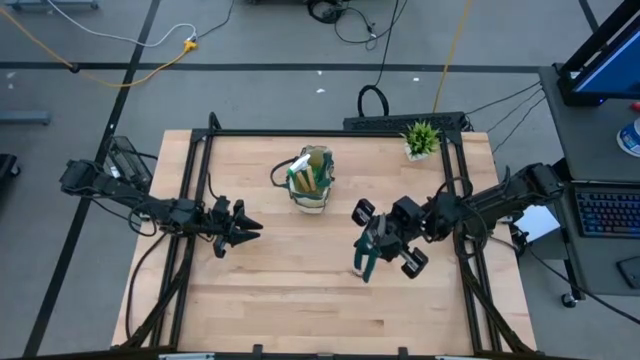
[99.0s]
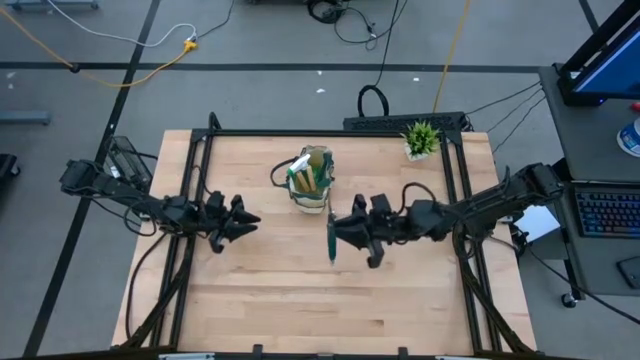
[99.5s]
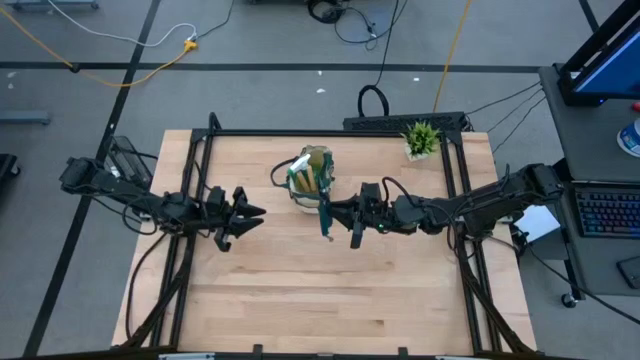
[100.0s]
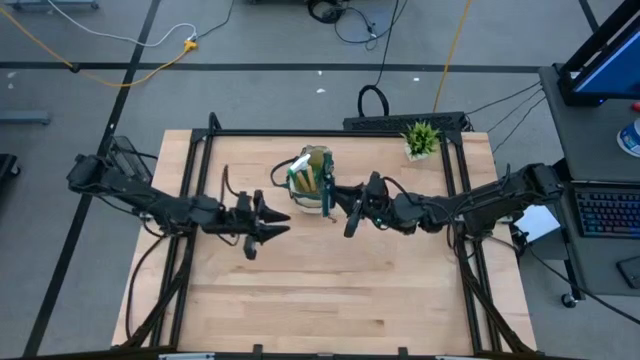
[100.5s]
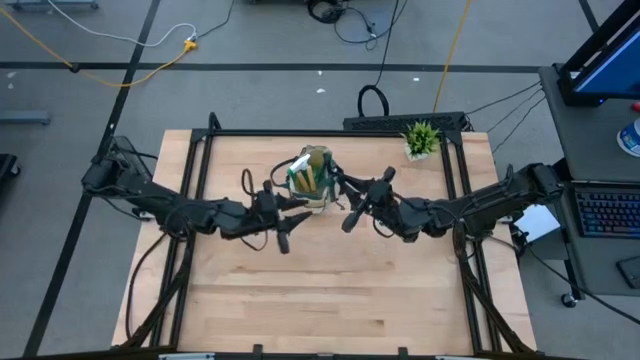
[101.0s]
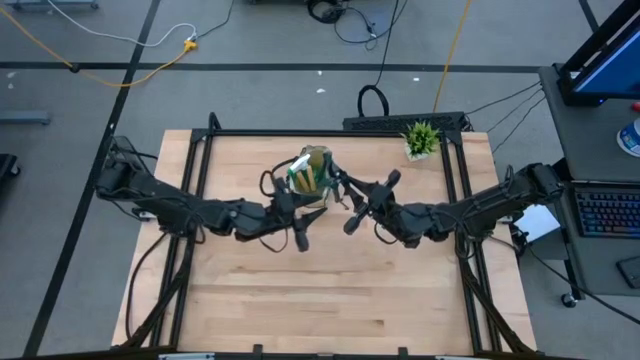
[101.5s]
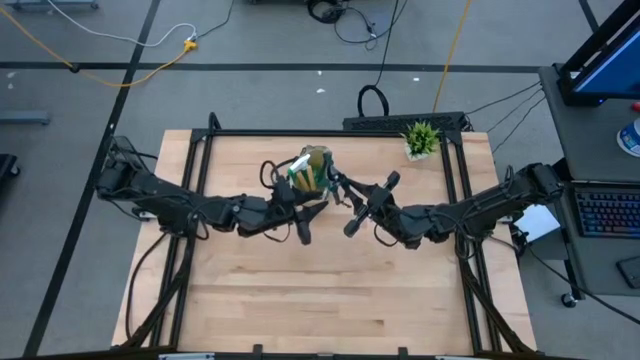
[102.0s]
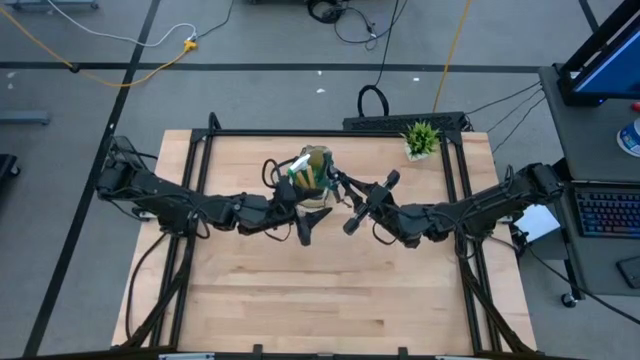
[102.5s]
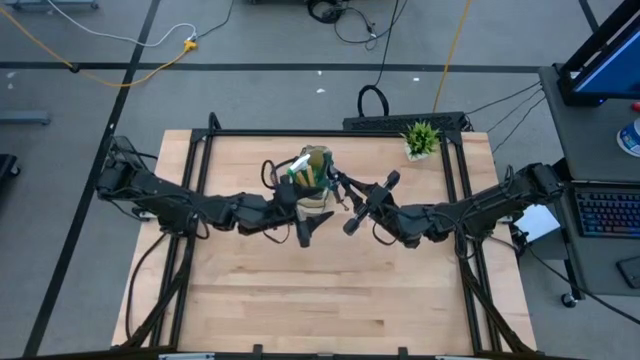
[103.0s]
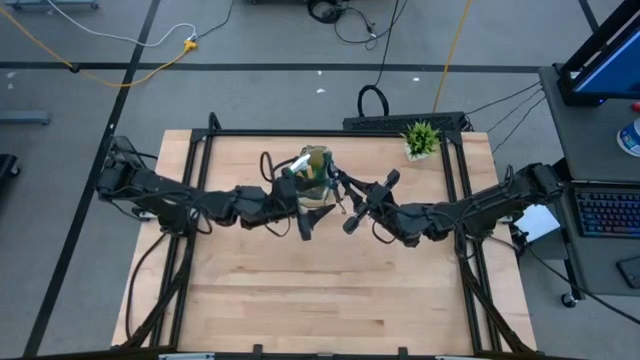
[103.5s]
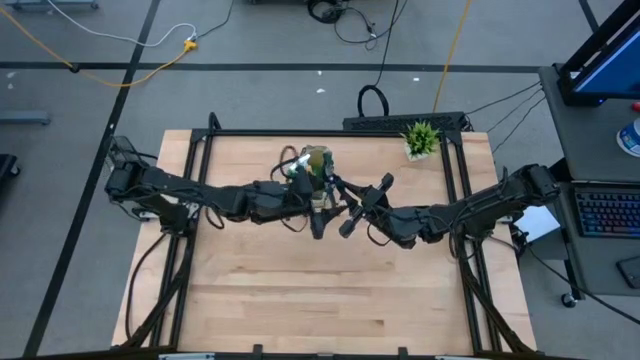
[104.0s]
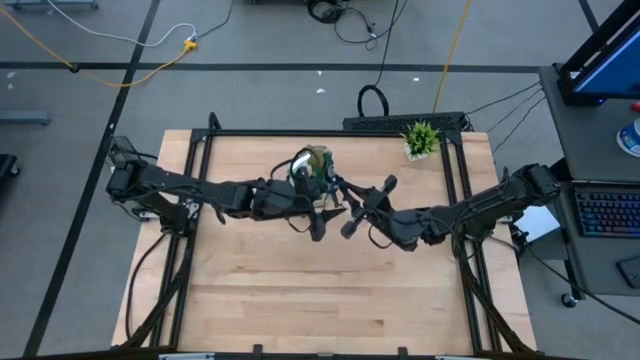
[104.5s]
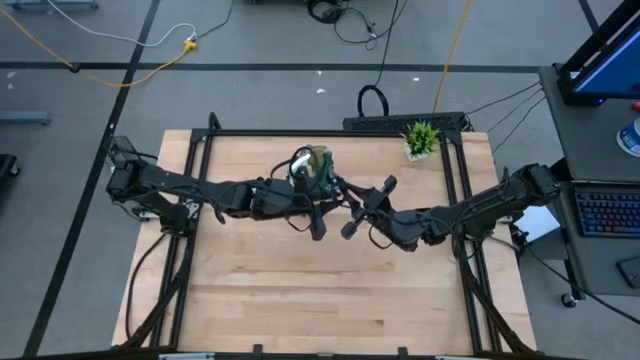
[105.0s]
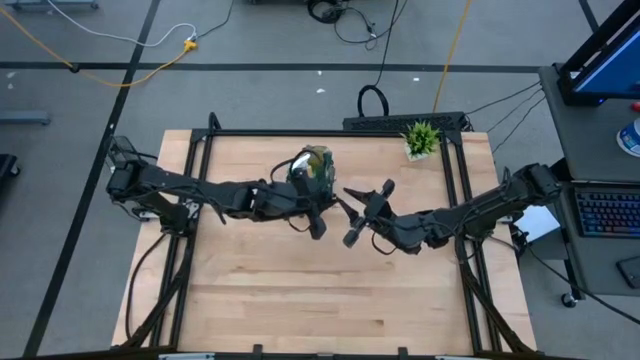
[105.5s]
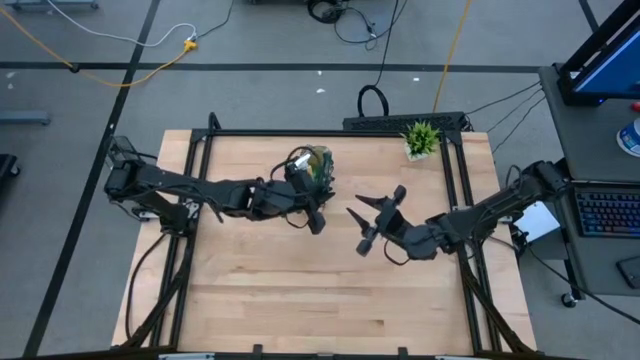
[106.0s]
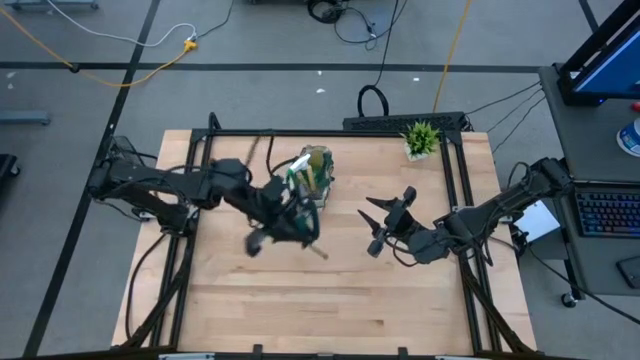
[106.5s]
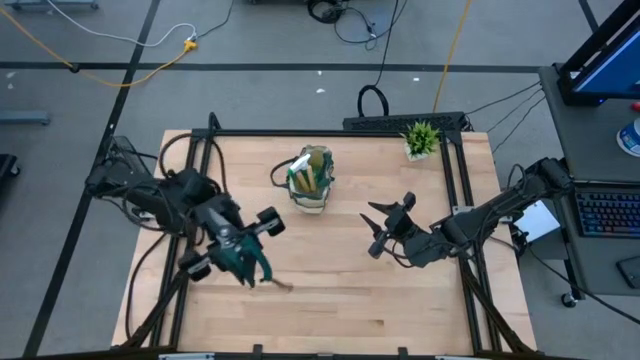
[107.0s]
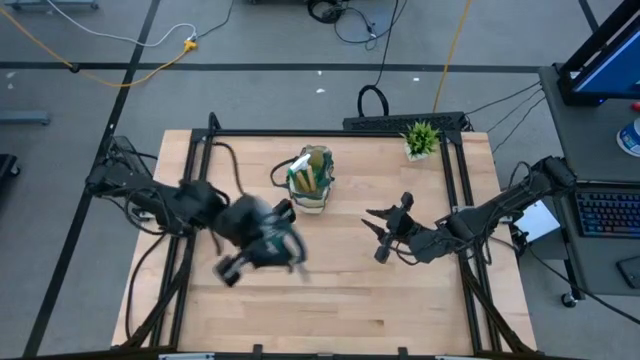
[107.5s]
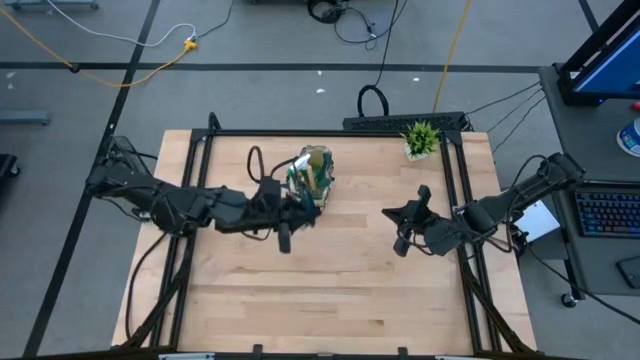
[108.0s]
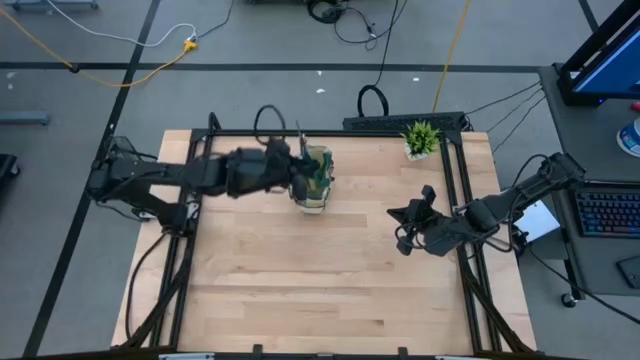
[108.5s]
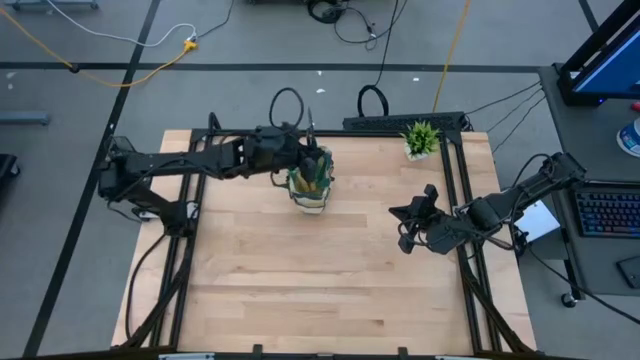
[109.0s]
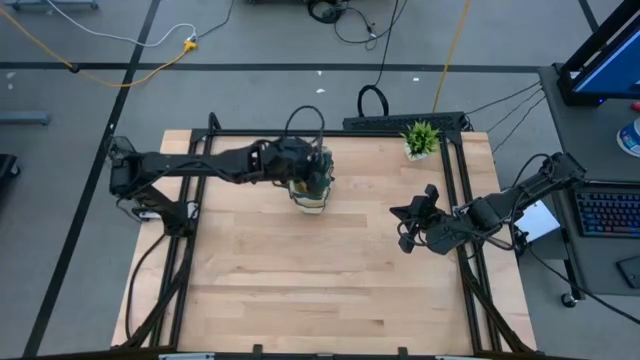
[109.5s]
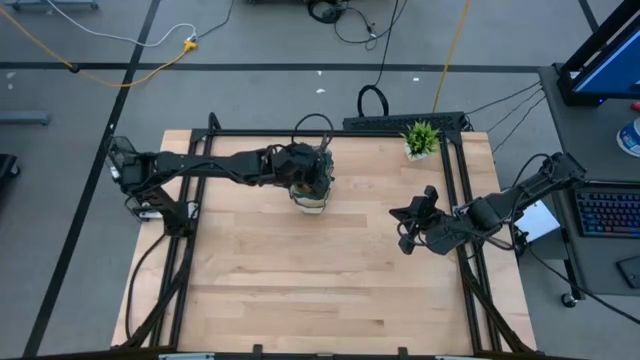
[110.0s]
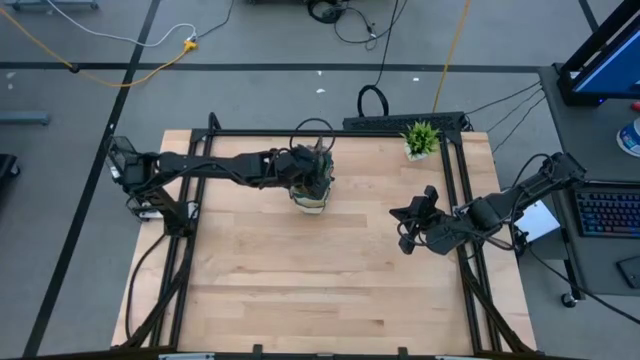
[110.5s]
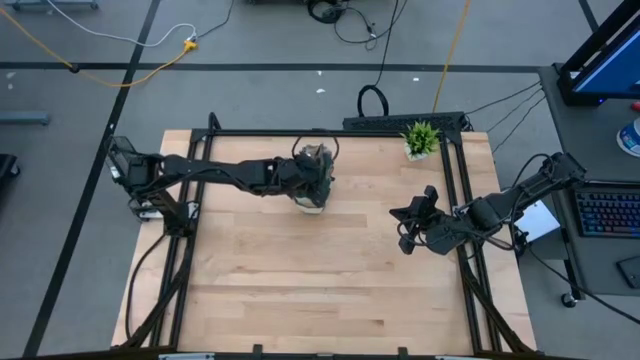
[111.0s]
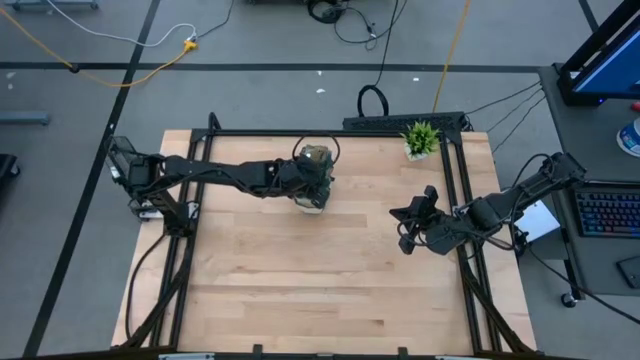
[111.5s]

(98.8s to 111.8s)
Task: Pick & Place Garden tools in Gardening bag
Put the green shear scissors into the top gardening bag

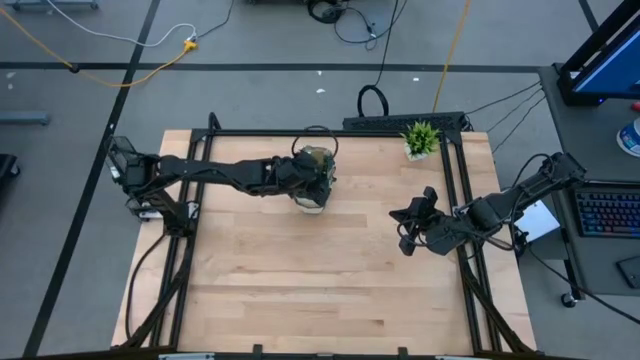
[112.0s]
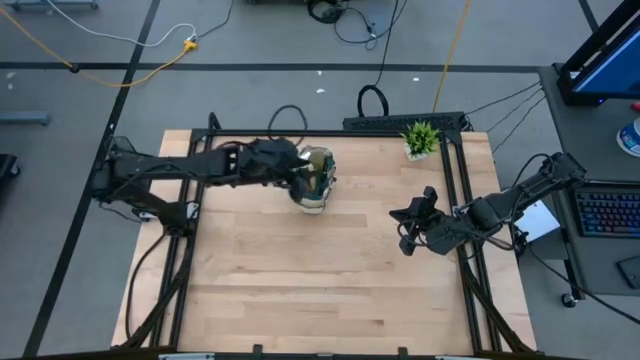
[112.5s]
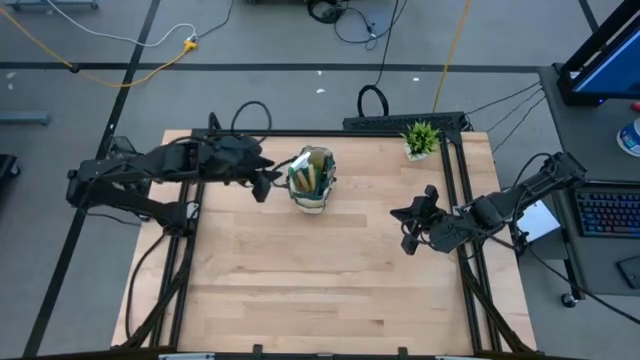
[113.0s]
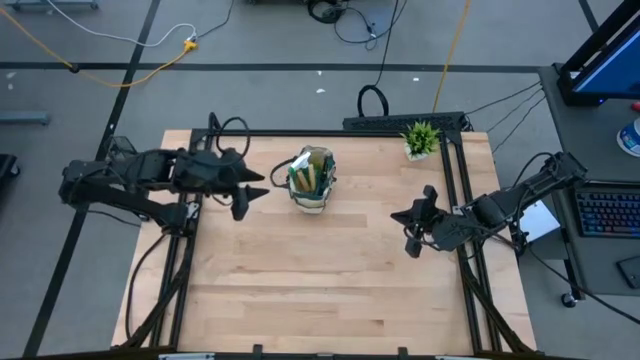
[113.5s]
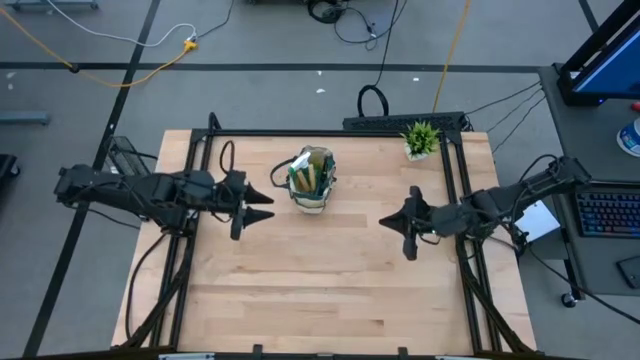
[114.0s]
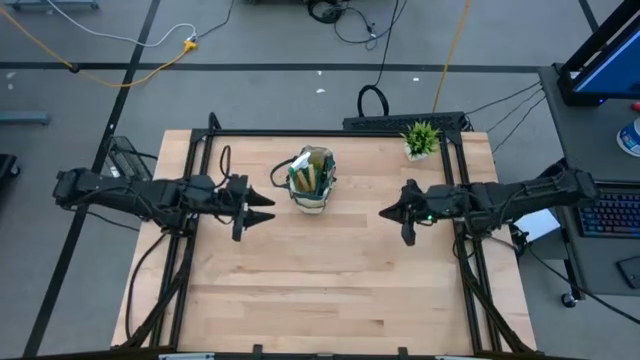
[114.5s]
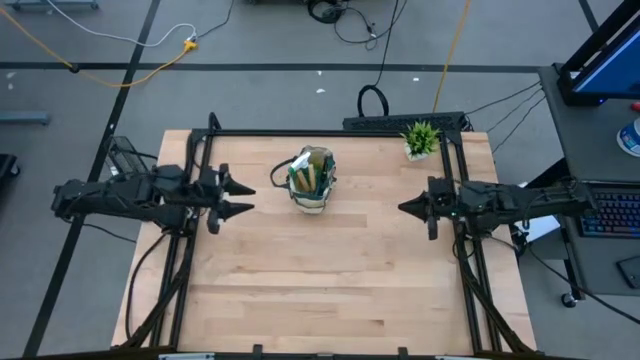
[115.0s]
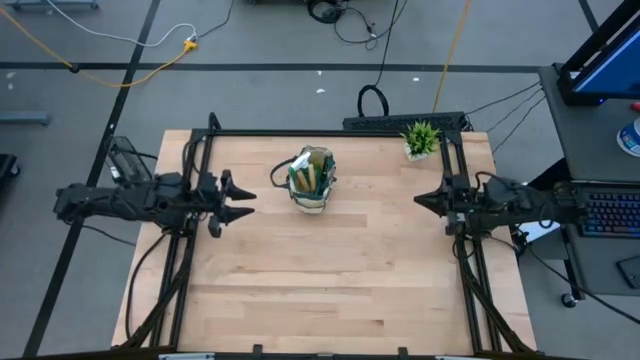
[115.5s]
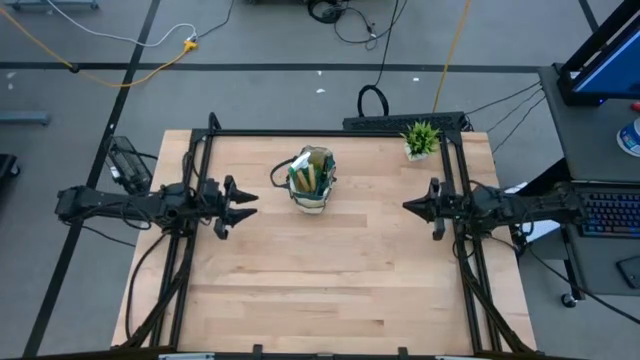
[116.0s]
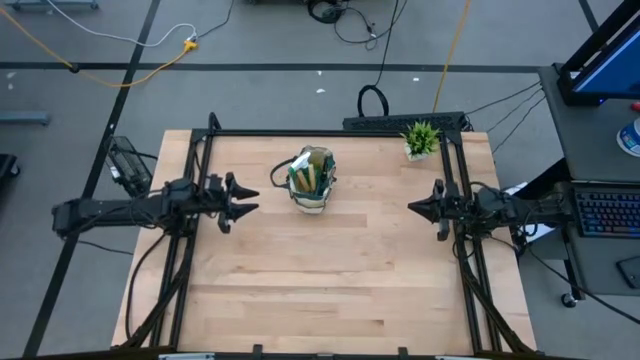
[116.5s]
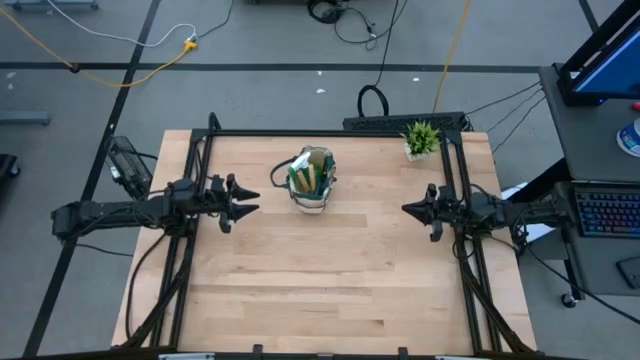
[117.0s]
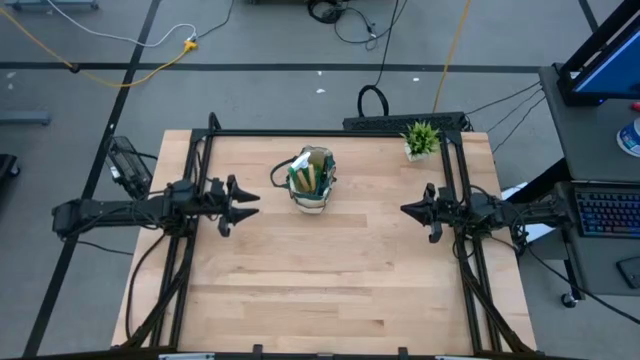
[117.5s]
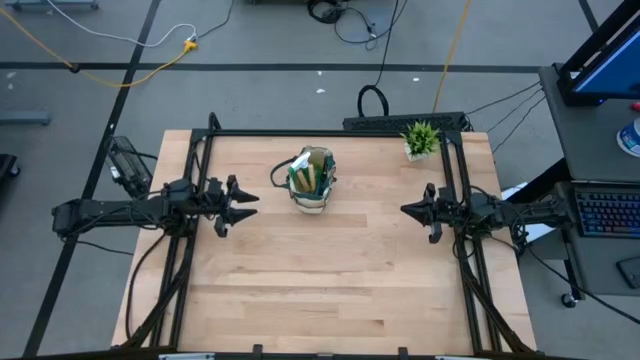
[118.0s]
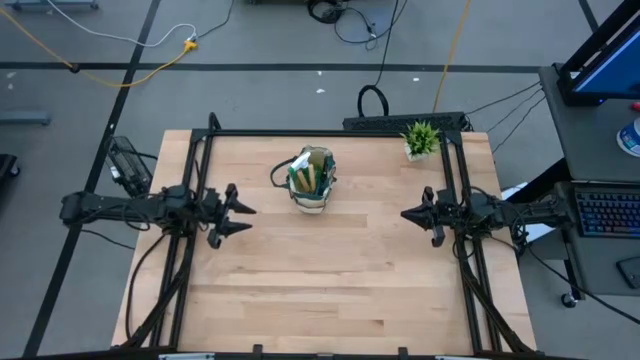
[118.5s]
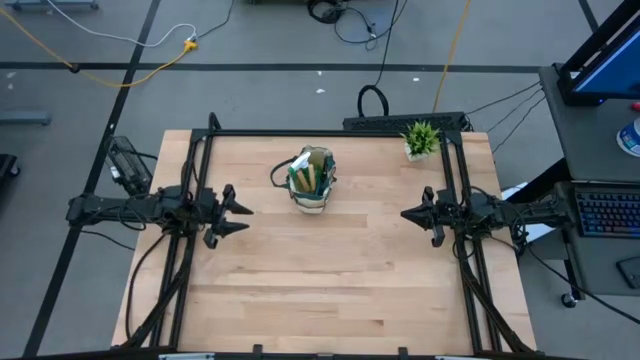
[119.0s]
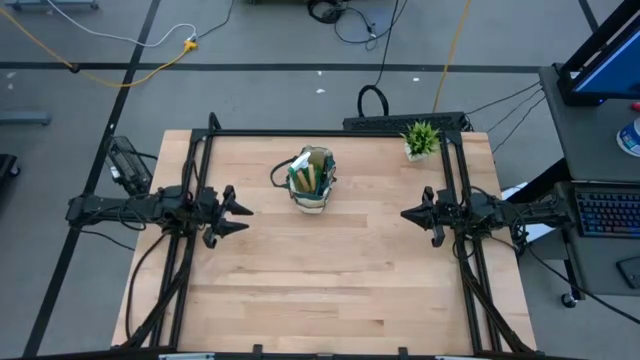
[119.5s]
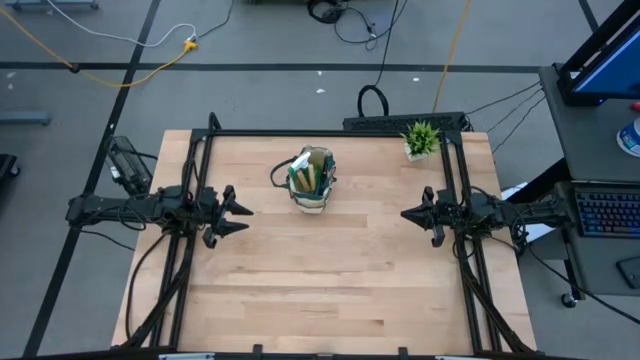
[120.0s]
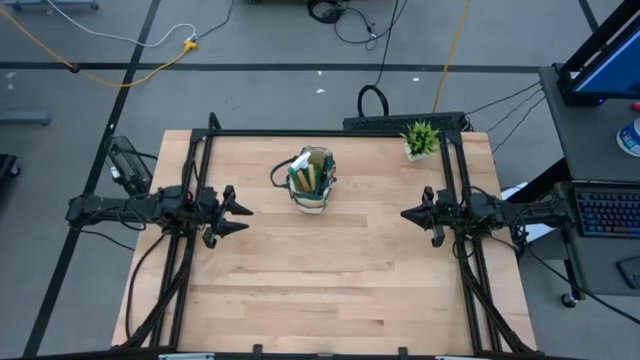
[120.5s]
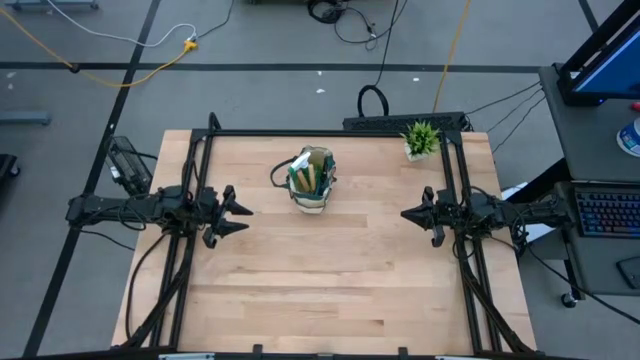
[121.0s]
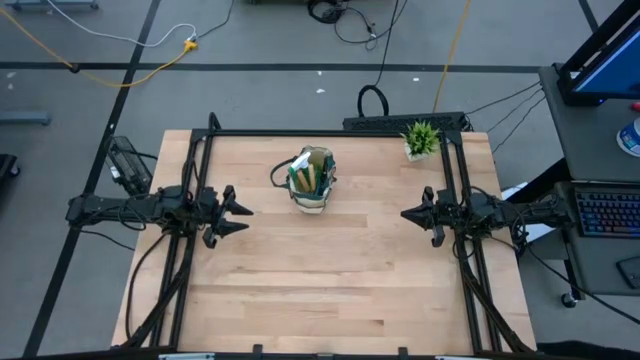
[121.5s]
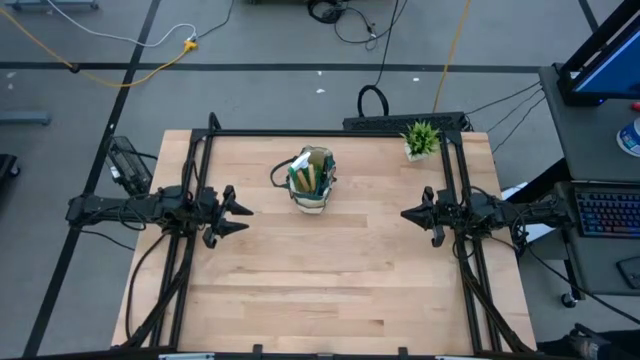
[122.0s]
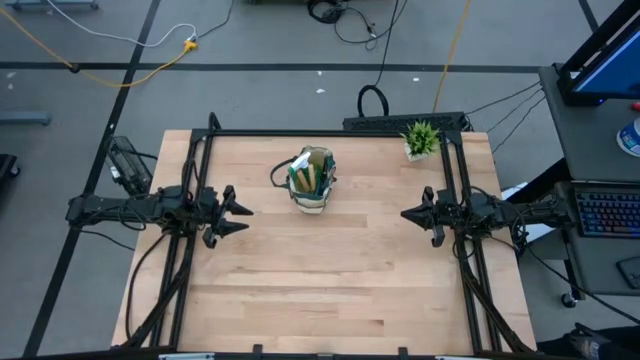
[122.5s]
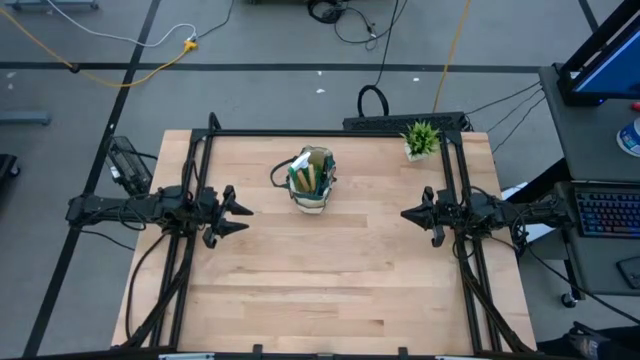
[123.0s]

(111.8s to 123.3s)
Return to Home Position
